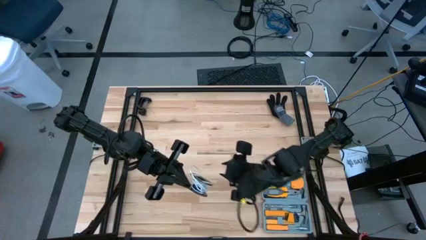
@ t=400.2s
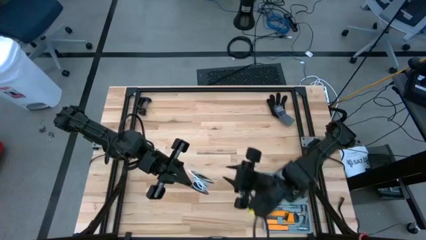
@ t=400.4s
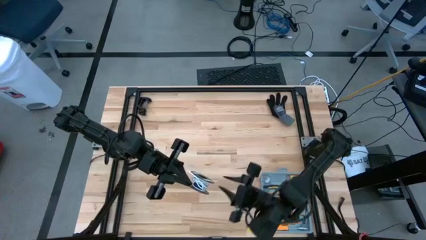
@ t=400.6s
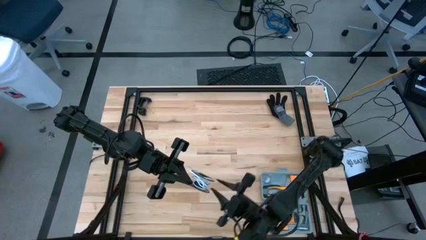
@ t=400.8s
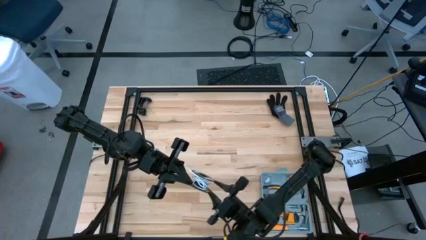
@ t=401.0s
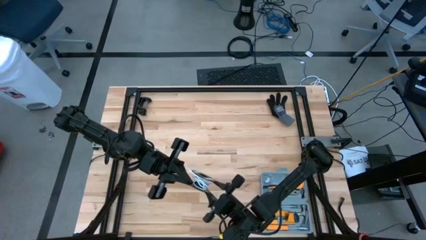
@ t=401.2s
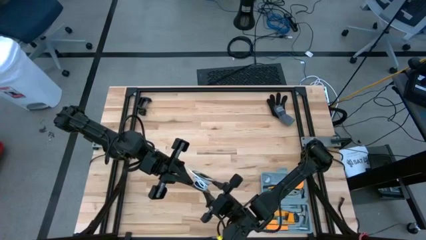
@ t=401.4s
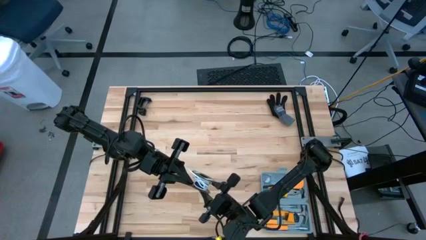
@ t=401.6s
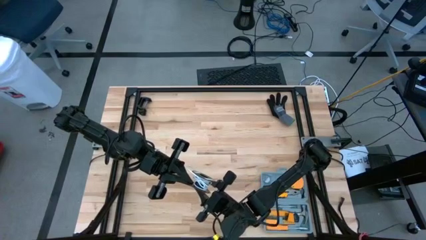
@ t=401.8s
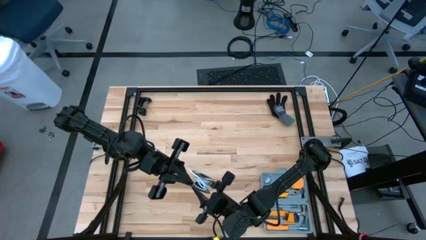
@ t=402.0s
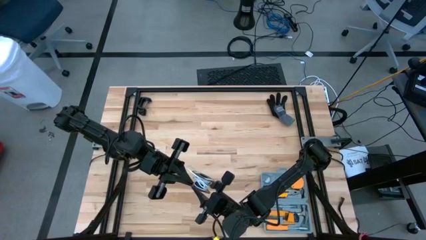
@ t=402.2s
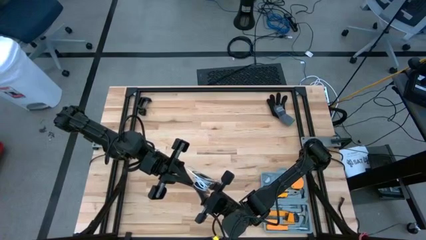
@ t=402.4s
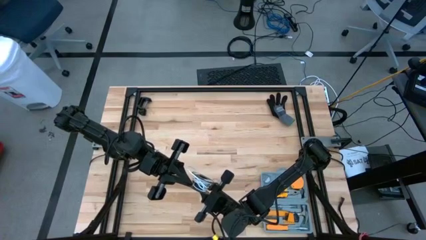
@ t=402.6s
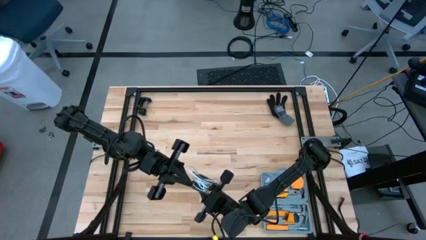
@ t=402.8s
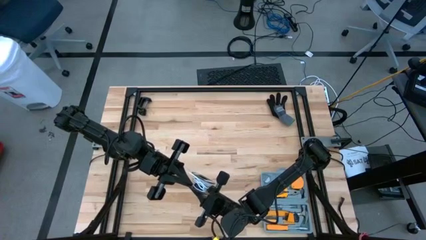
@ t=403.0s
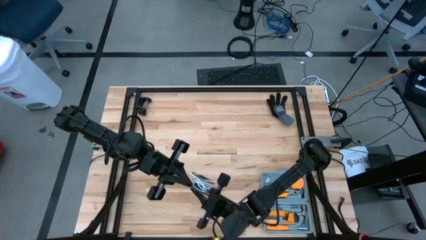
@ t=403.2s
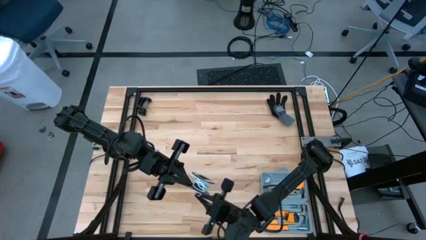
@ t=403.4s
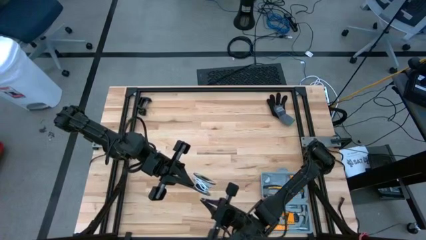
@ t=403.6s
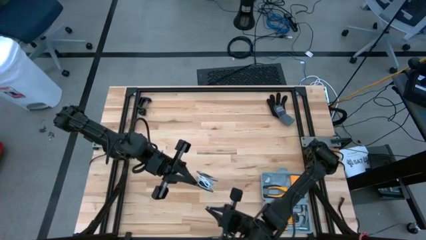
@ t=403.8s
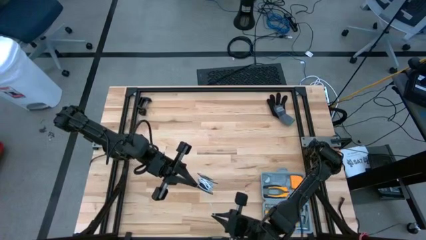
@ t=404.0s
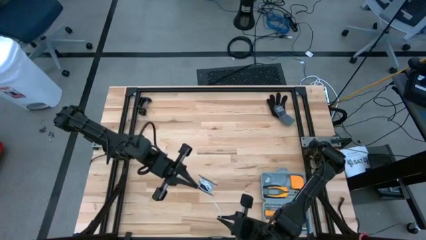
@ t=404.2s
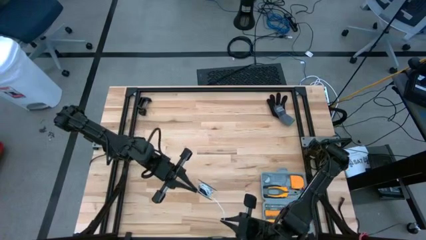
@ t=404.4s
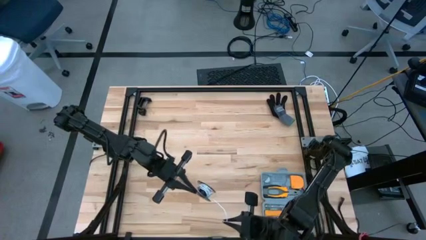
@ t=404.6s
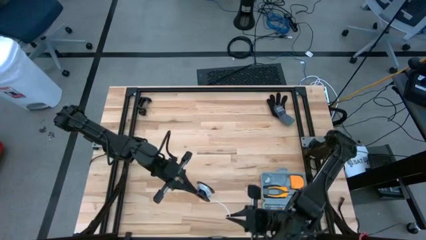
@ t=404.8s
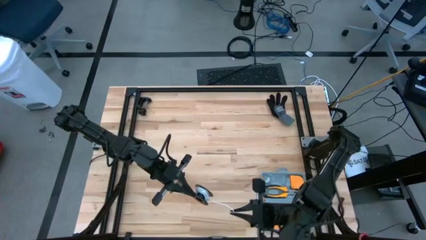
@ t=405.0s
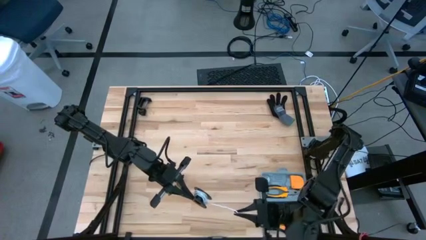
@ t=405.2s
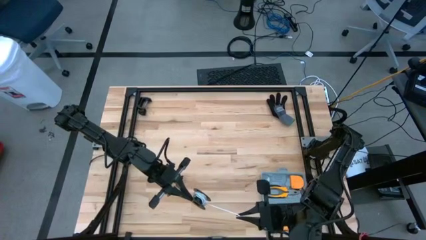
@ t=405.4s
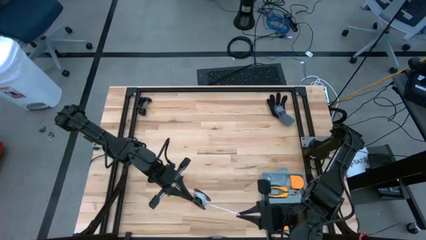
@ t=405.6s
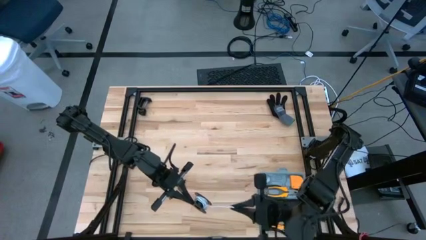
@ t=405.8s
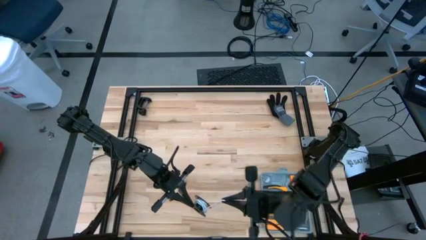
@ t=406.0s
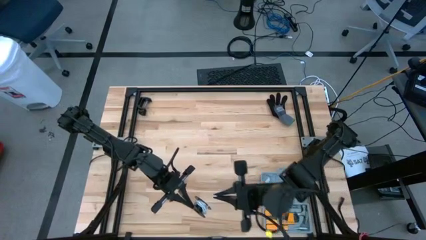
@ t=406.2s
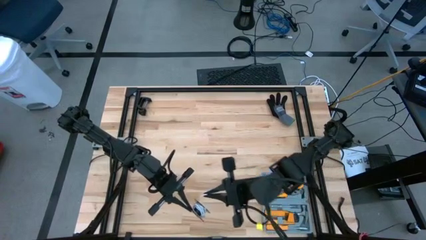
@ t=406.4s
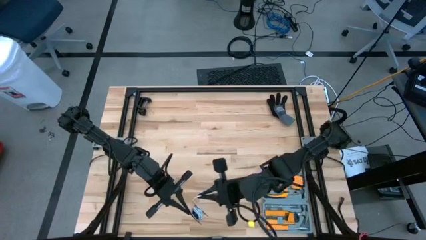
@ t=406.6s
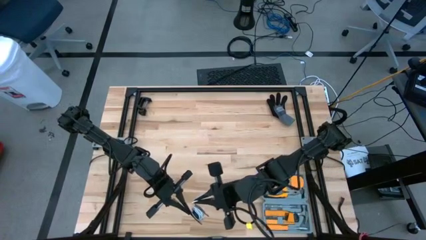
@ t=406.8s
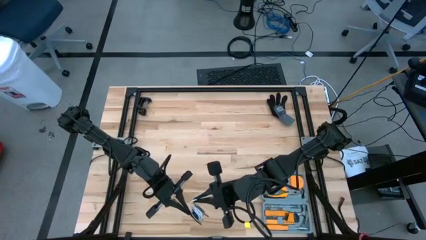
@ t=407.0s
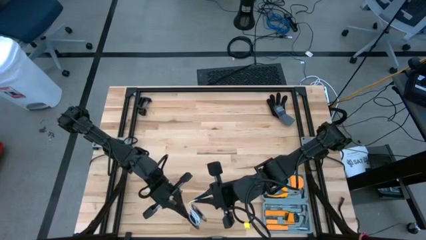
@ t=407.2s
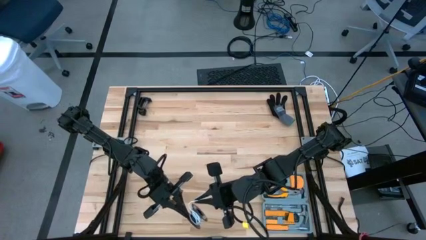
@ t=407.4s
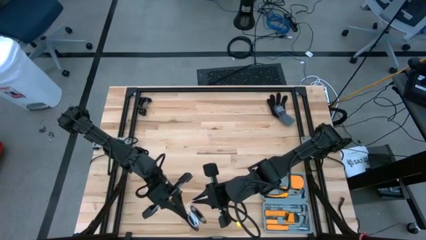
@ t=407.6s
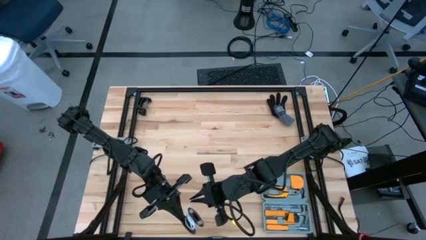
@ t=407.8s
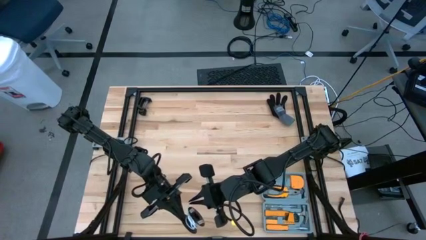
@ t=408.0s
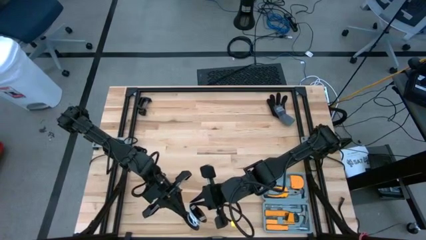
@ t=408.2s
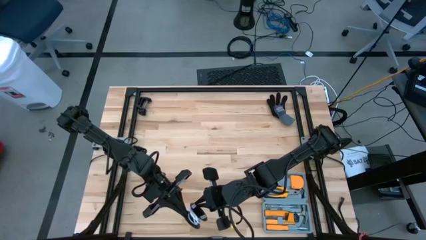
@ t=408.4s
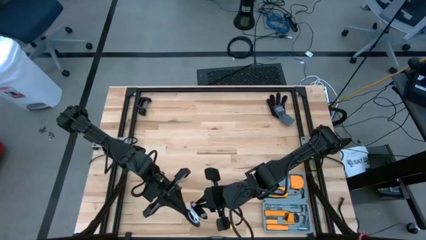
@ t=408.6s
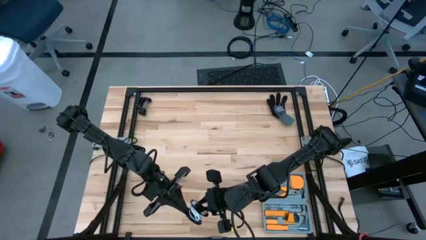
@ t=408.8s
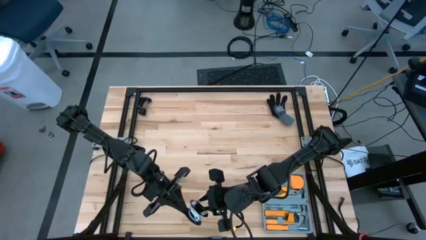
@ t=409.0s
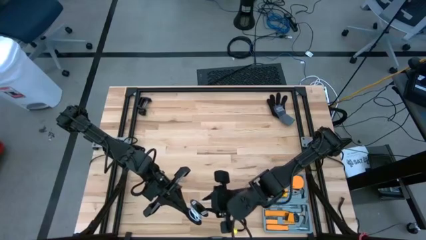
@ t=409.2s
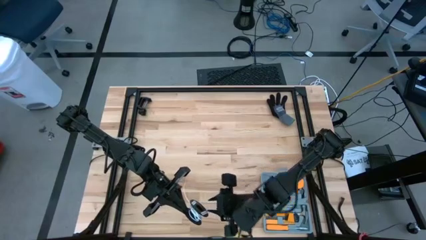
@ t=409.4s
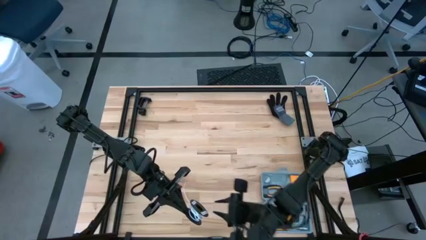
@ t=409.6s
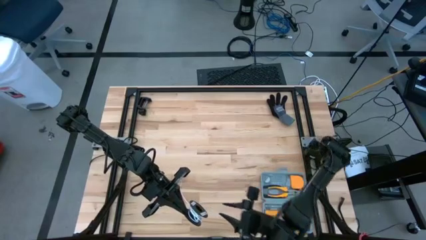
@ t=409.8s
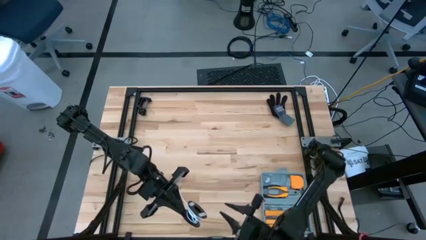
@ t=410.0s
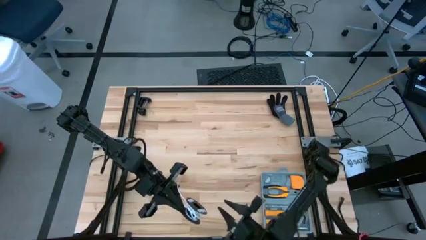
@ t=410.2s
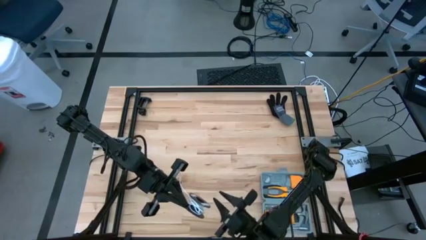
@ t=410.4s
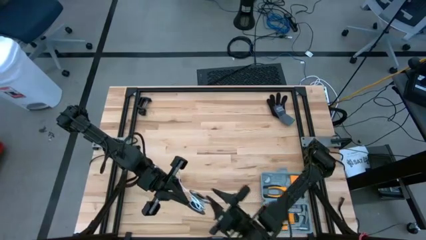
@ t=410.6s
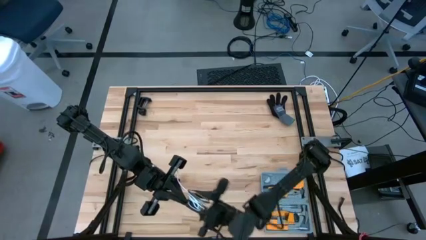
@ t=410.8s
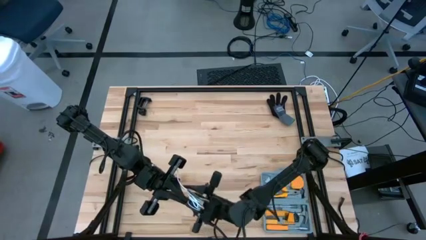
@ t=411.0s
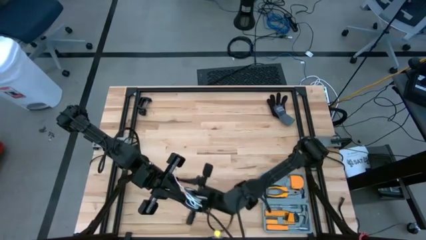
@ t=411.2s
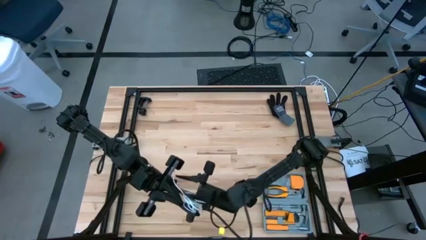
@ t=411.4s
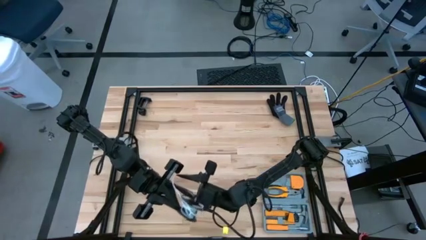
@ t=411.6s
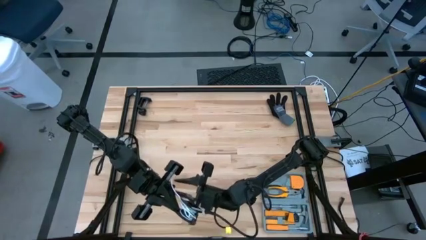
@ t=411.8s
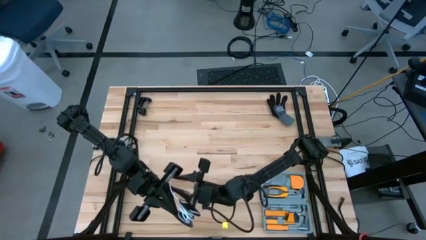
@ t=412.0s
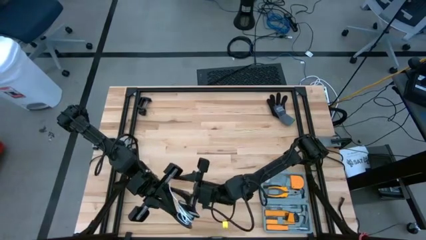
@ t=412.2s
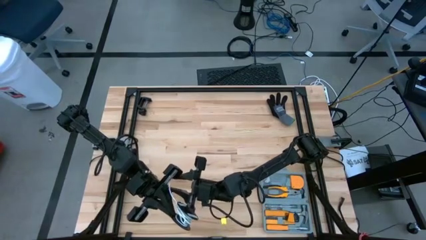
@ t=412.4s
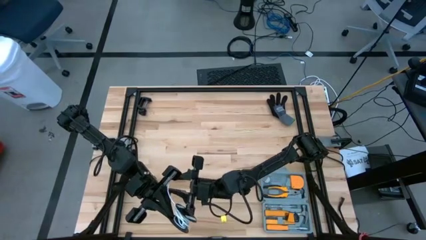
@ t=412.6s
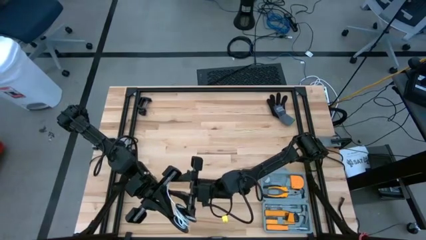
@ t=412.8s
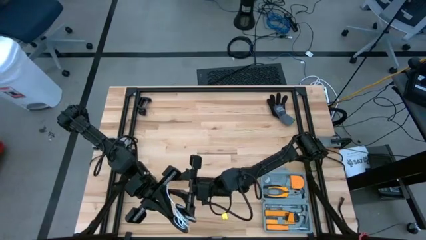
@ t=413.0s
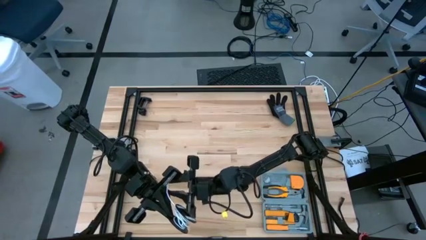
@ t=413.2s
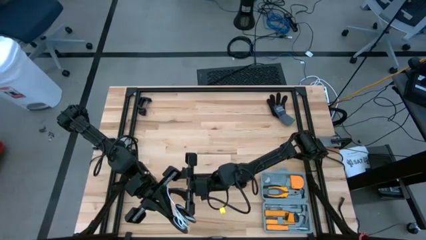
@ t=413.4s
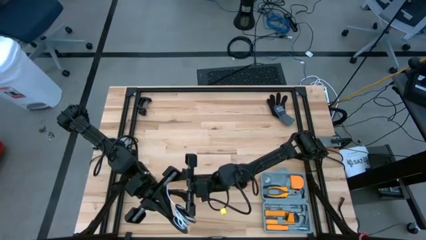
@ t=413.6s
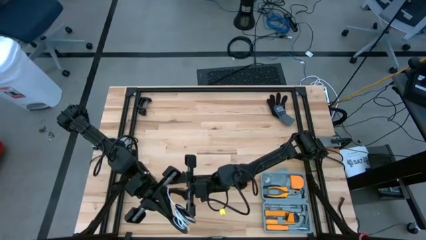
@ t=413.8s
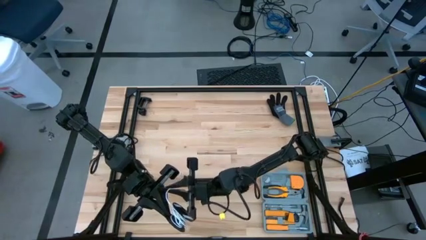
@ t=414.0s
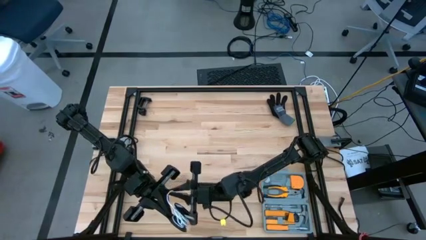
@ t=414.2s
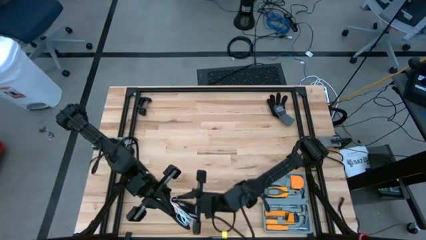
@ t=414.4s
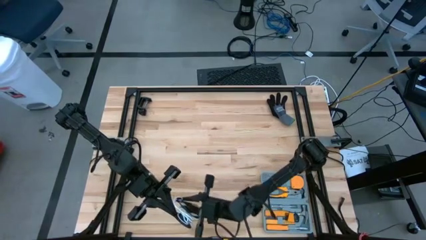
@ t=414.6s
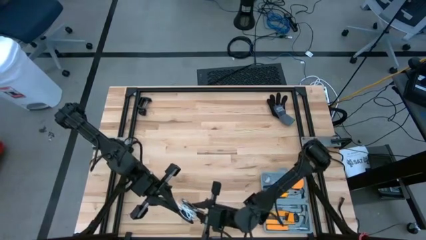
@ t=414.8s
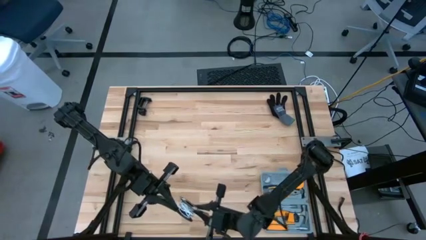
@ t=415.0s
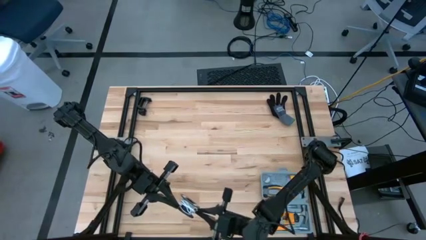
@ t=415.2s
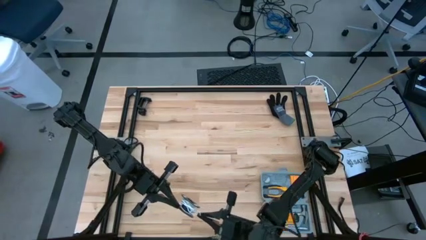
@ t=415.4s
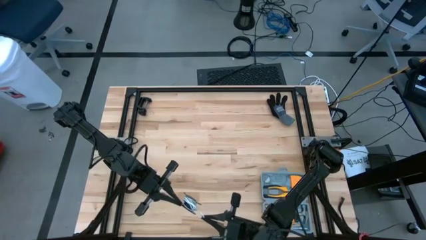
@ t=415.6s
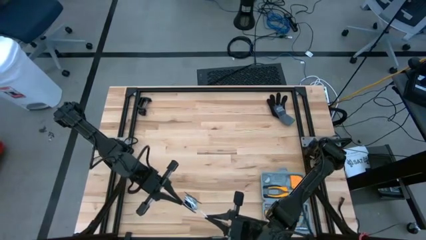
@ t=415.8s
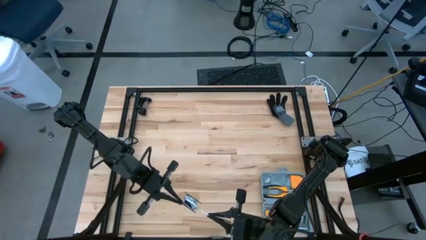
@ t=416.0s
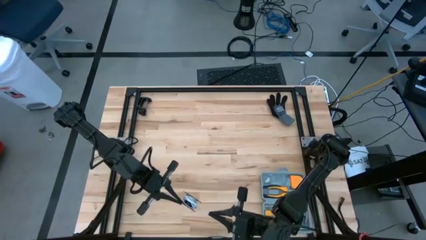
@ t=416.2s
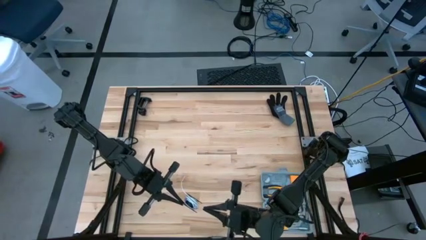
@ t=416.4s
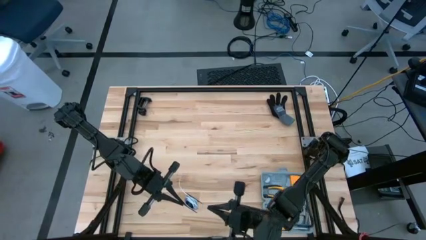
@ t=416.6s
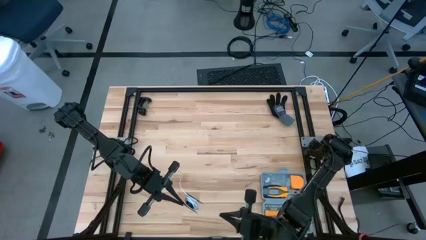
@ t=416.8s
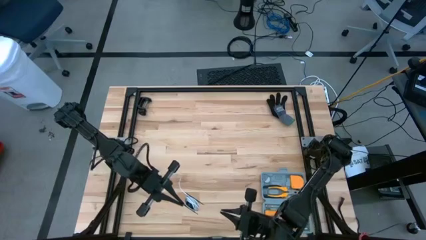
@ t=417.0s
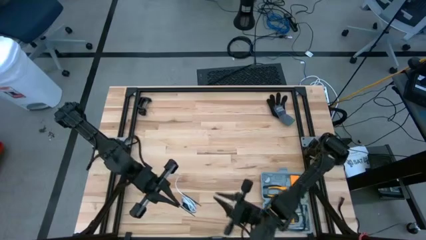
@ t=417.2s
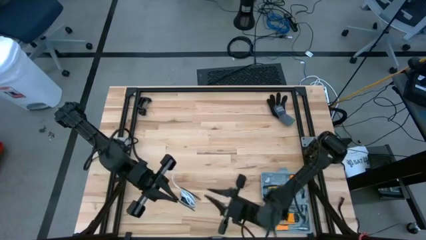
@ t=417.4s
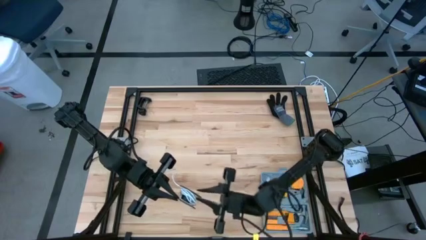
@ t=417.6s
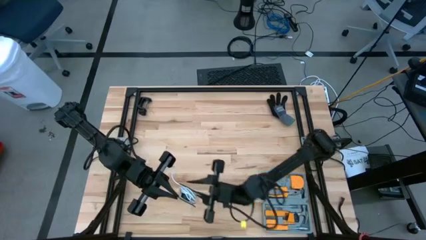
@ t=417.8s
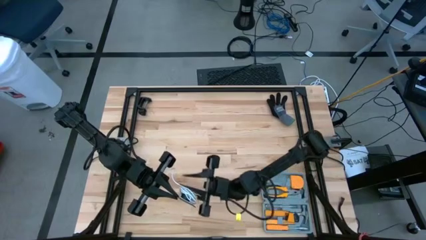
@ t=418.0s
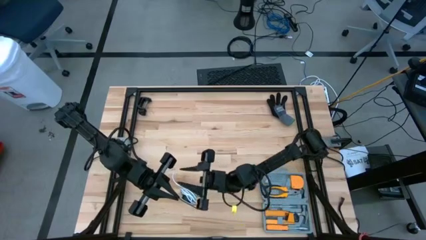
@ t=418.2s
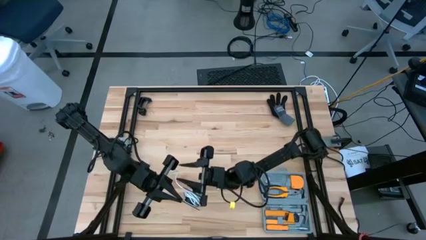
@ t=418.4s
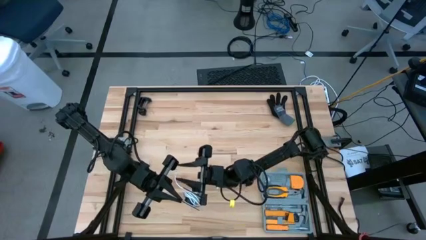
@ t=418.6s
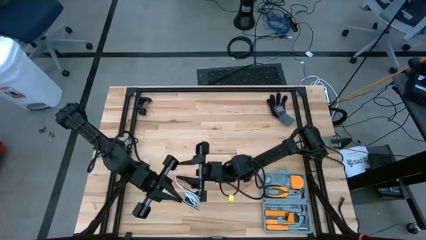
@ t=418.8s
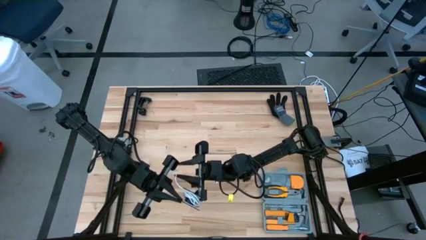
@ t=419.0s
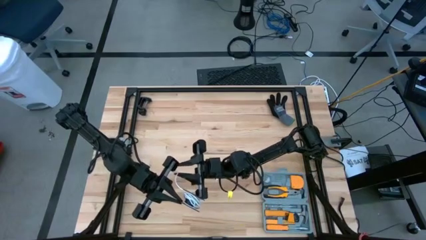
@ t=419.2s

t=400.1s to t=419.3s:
Task: Coil cords
Coil the white cable wire onto the spool
